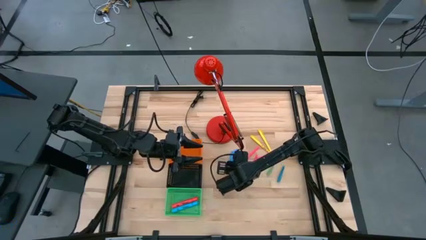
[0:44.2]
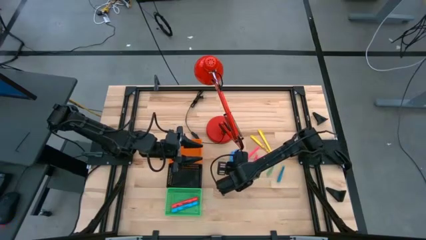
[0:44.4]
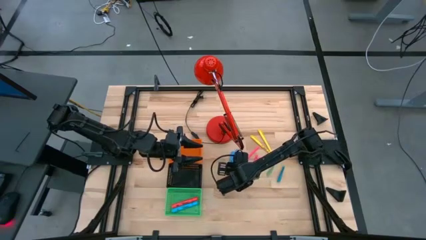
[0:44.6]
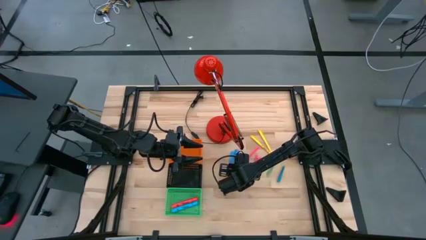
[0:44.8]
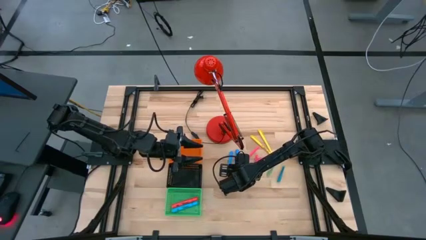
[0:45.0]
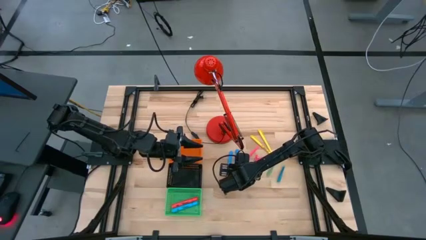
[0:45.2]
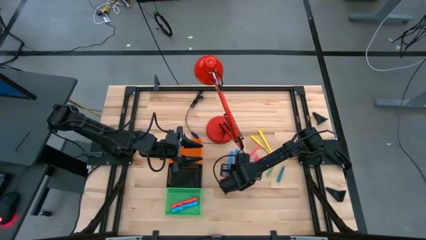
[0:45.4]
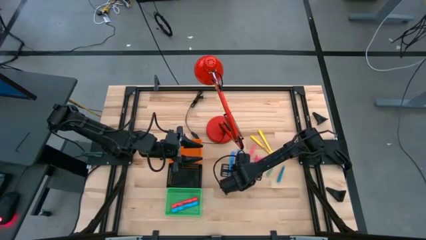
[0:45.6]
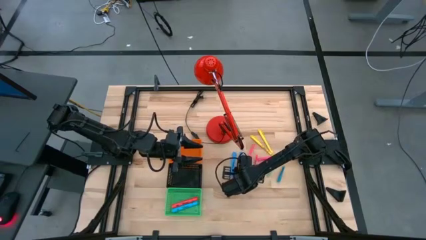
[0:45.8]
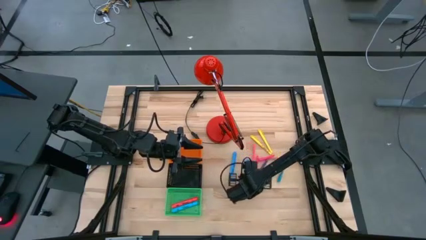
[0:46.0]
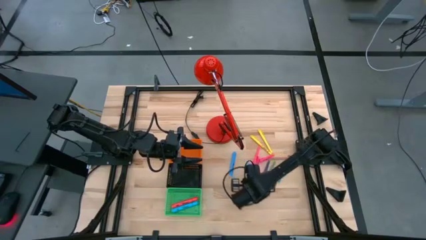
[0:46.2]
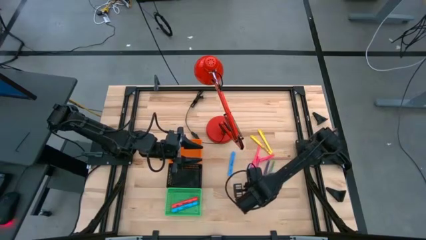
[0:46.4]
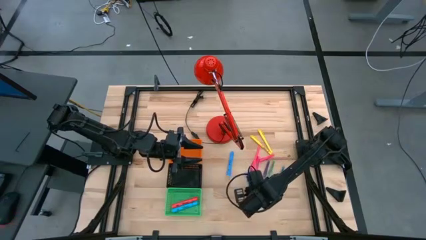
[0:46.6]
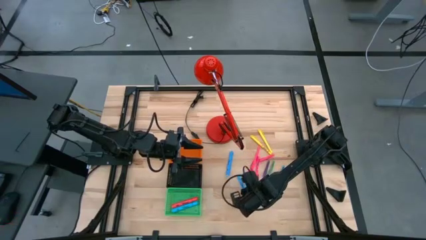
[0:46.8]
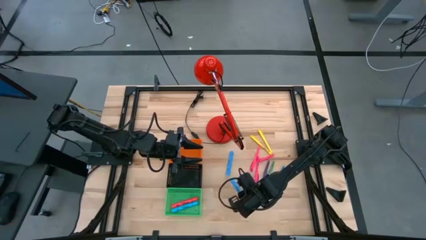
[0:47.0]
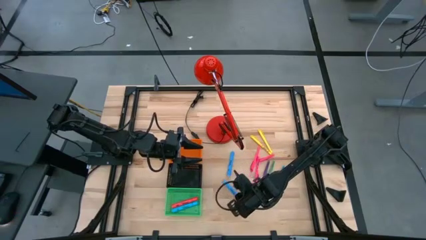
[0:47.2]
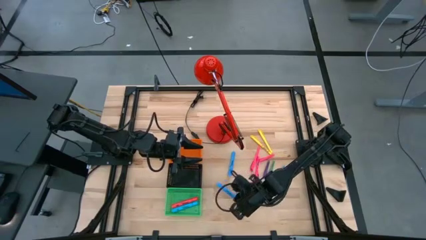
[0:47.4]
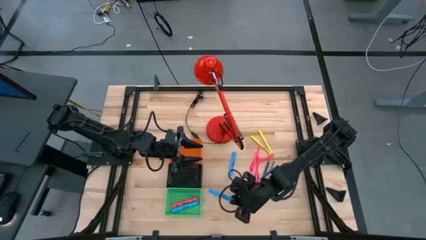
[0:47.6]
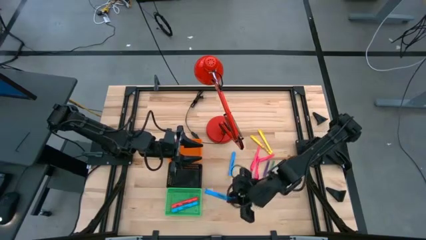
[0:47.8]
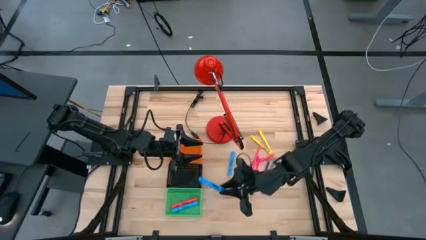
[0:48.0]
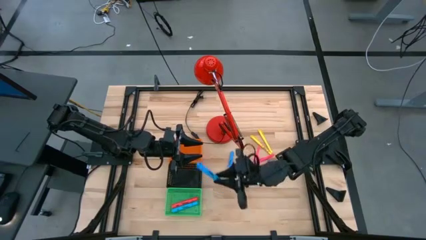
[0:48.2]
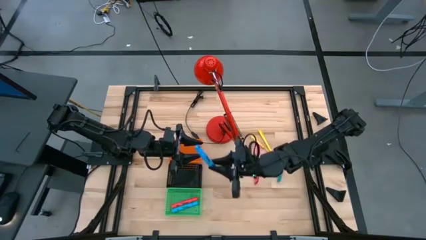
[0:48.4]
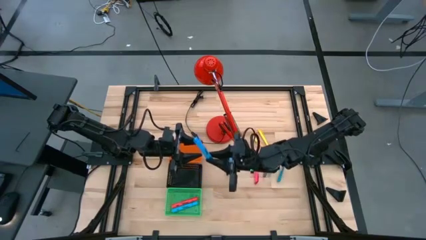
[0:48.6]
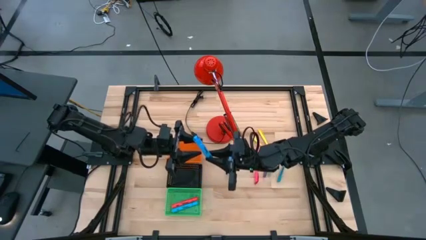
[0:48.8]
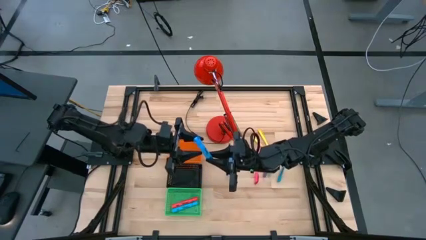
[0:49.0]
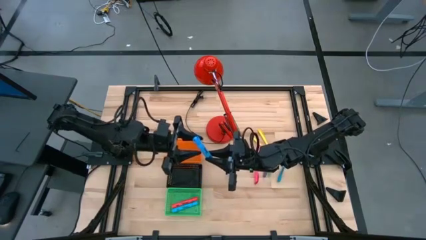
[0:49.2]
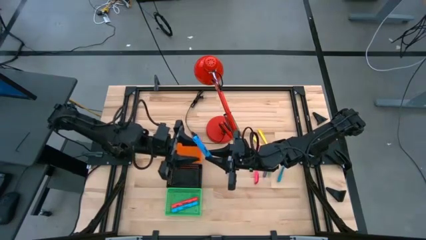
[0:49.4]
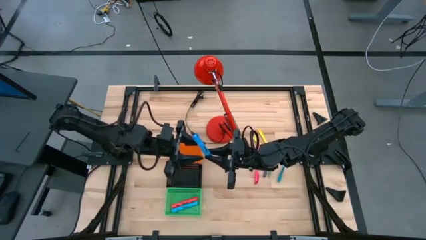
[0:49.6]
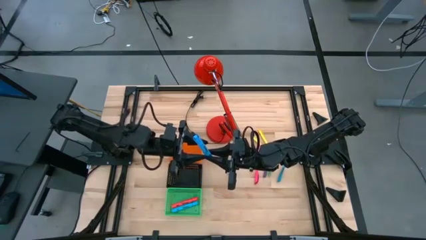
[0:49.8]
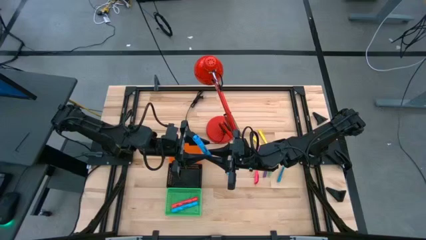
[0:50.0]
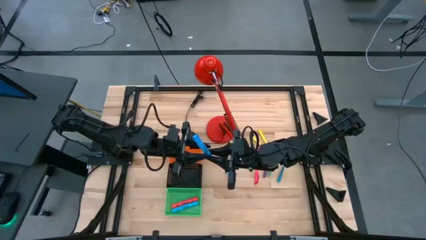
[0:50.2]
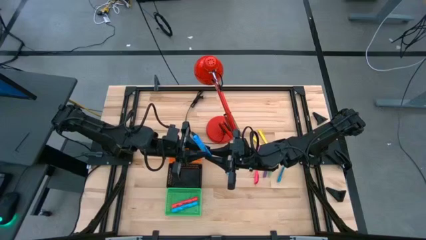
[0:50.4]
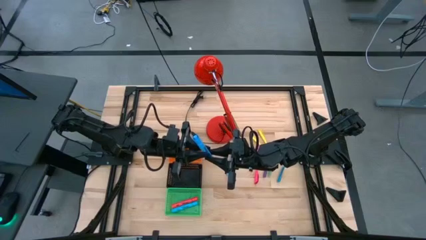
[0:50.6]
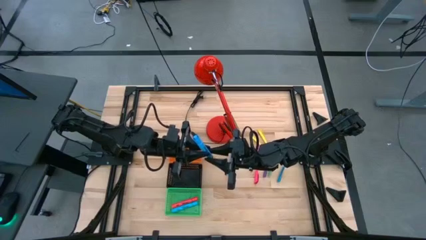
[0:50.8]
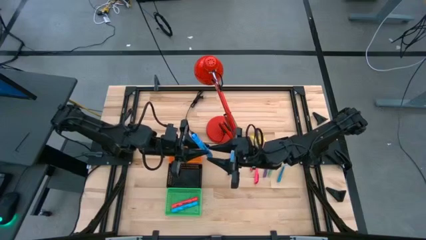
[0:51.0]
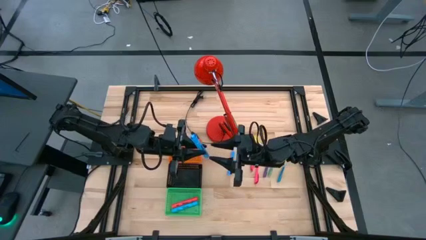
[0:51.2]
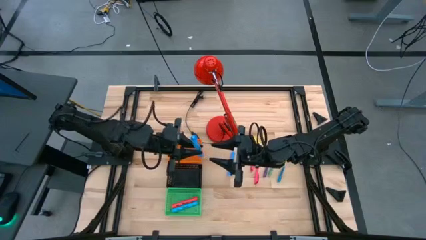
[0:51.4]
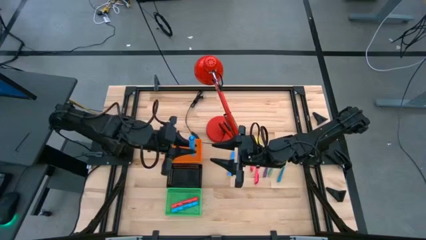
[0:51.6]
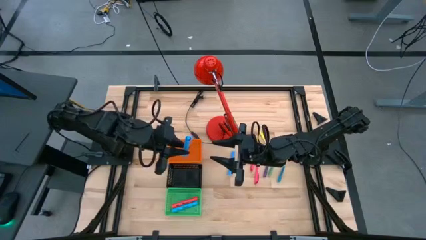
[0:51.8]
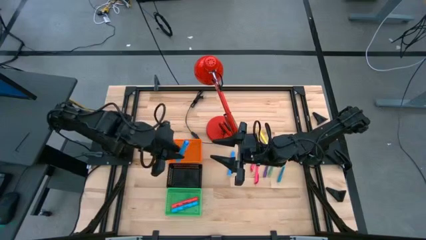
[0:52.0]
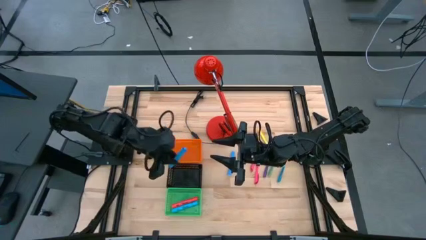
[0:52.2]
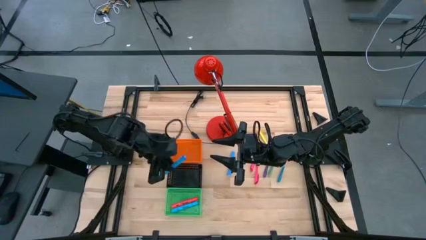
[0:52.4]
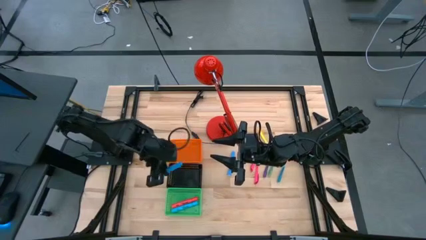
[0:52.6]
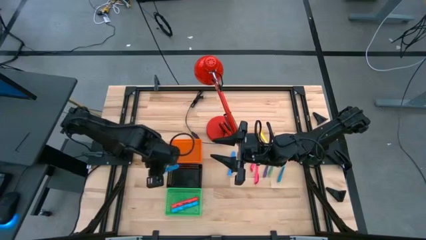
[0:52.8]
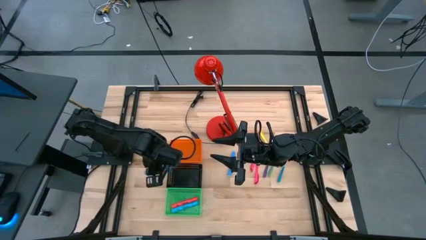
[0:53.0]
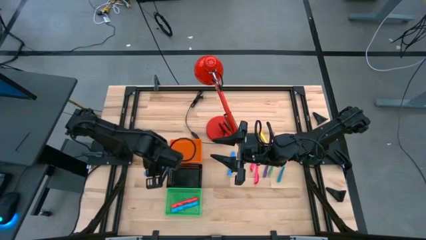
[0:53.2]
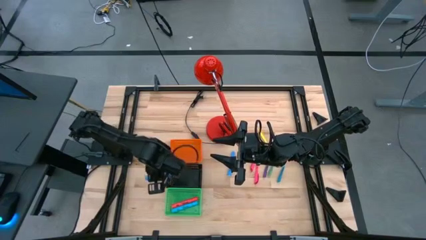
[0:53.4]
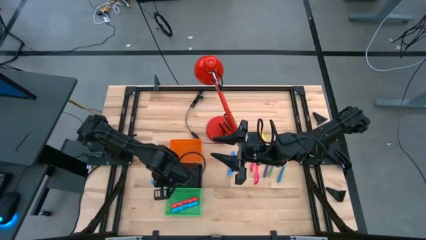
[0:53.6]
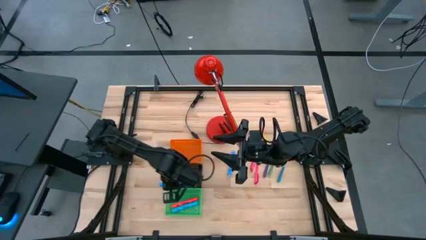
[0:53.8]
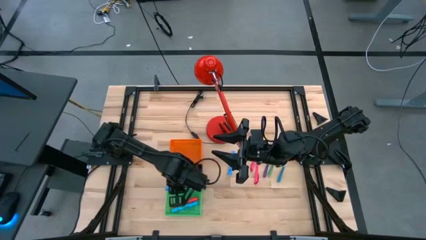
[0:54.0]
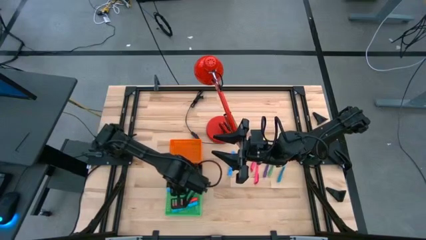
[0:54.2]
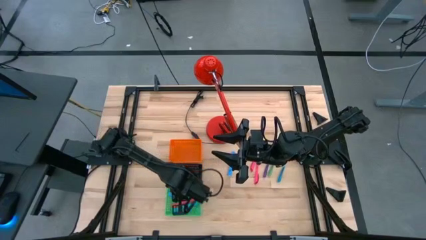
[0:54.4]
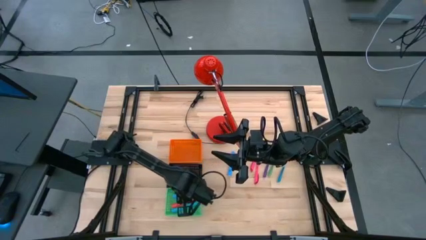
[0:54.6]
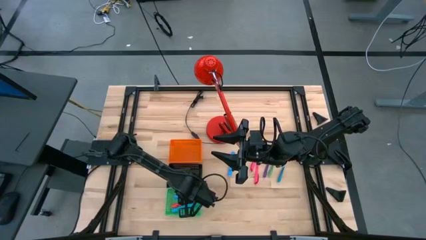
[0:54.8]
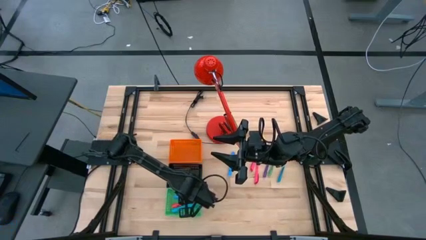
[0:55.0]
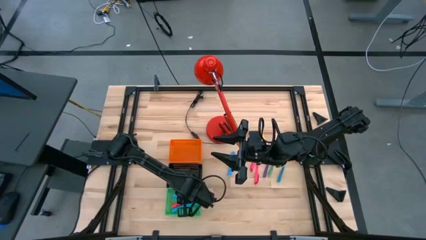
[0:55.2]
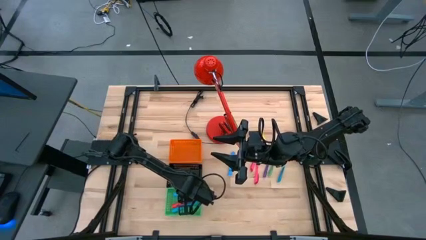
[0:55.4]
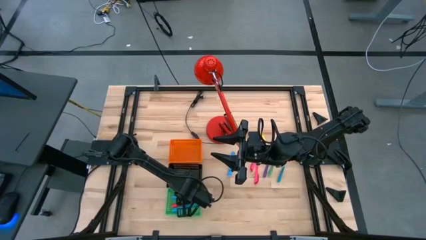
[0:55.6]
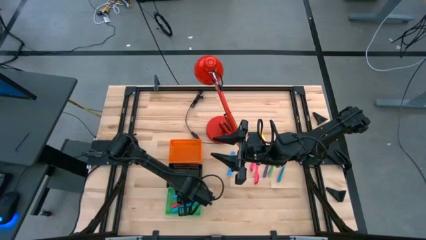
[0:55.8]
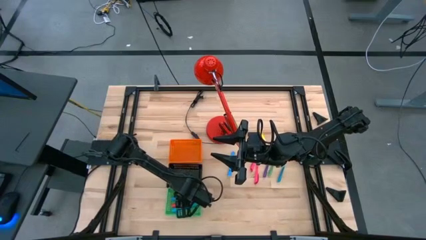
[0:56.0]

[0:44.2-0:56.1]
Task: Pick & Place Markers
Put the right blue highlighter into the green bin
